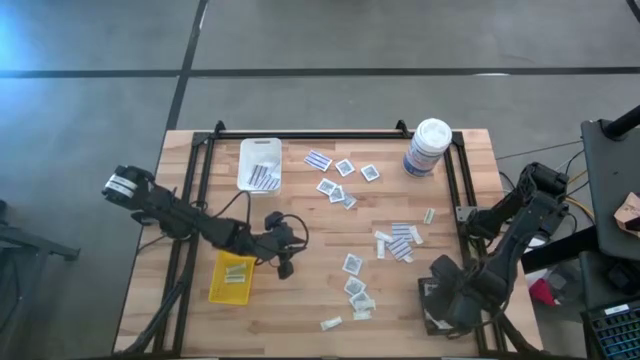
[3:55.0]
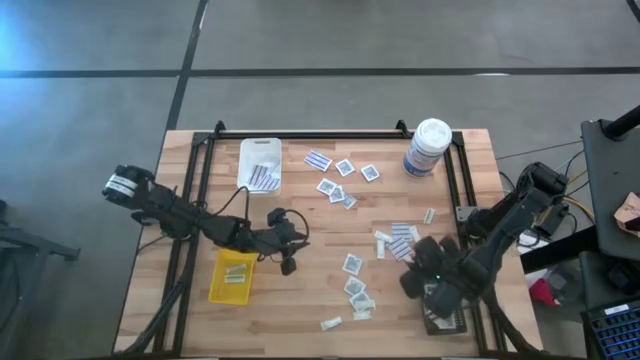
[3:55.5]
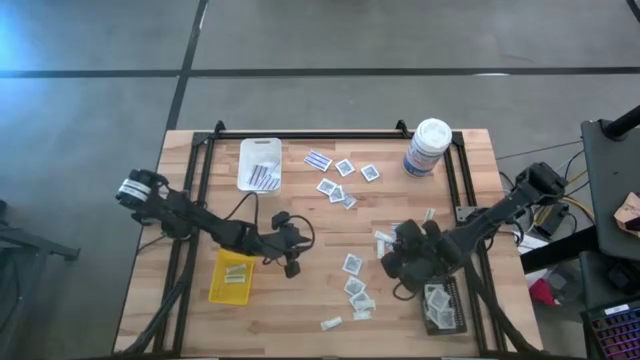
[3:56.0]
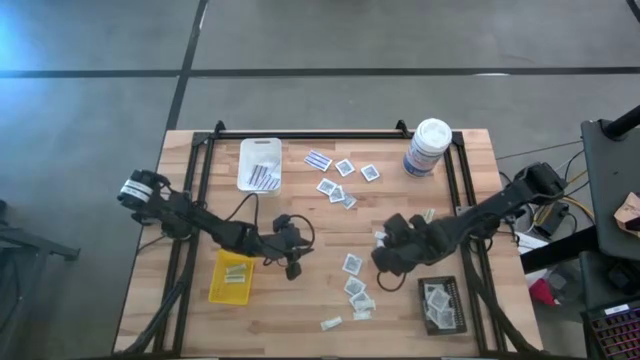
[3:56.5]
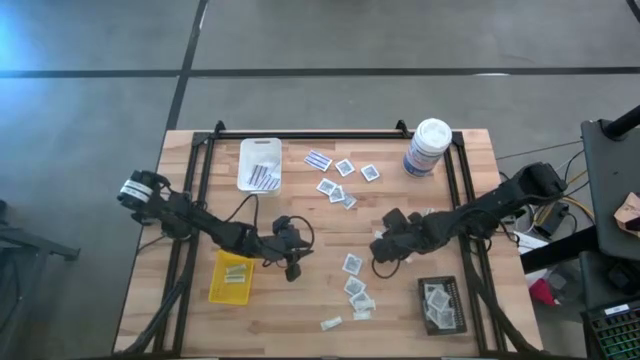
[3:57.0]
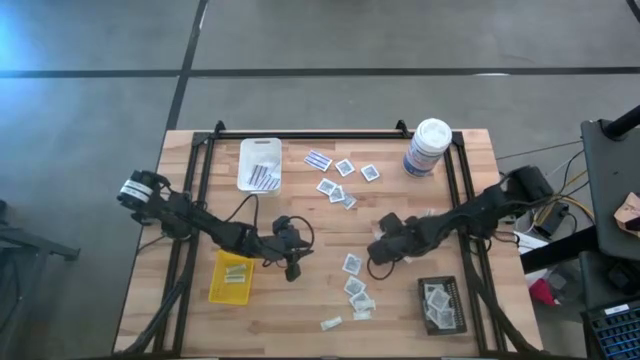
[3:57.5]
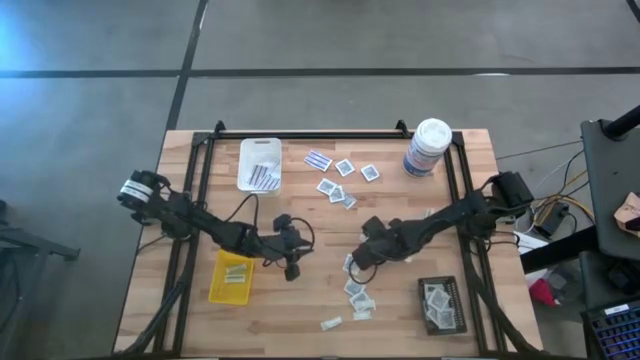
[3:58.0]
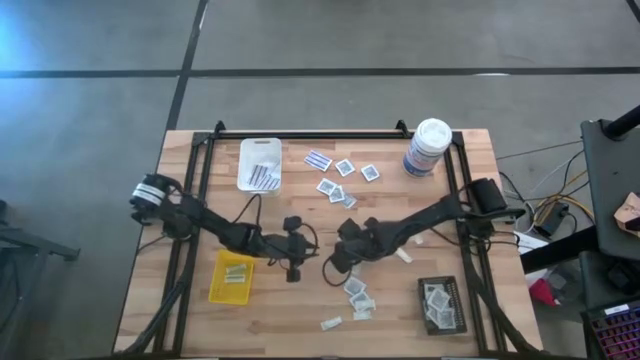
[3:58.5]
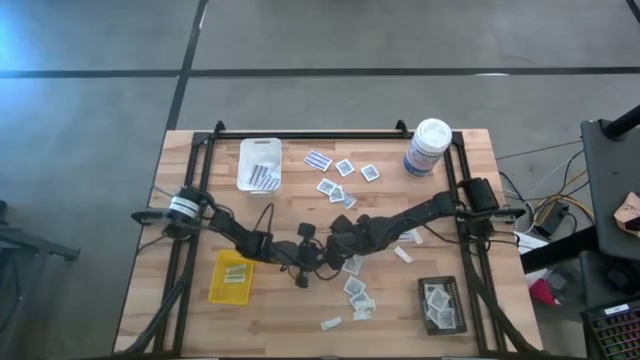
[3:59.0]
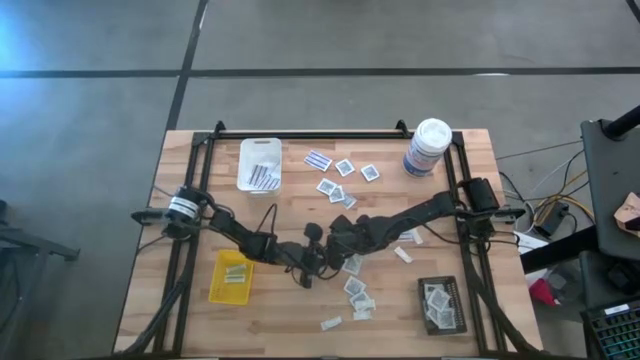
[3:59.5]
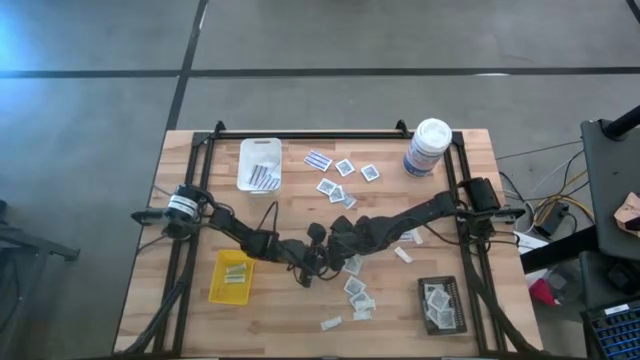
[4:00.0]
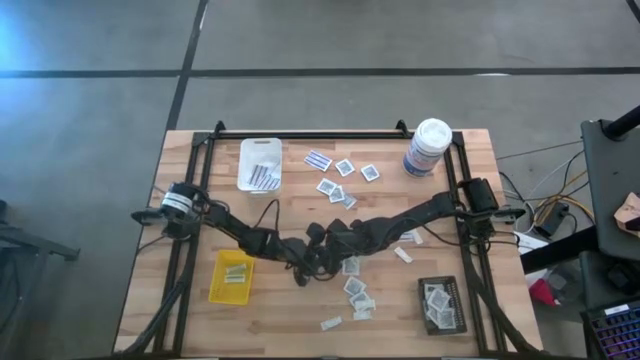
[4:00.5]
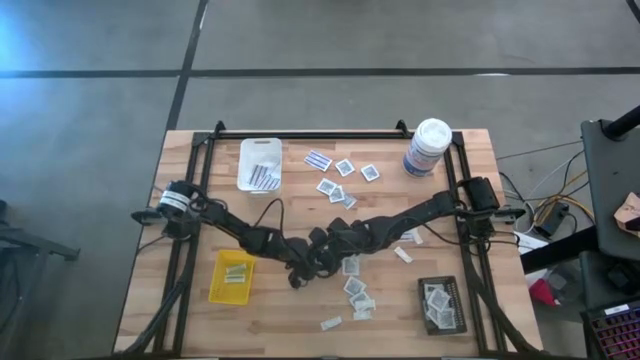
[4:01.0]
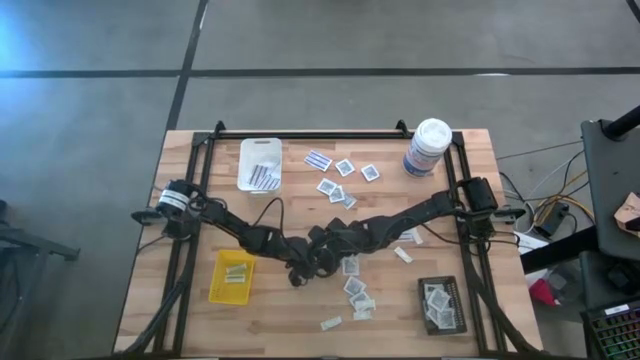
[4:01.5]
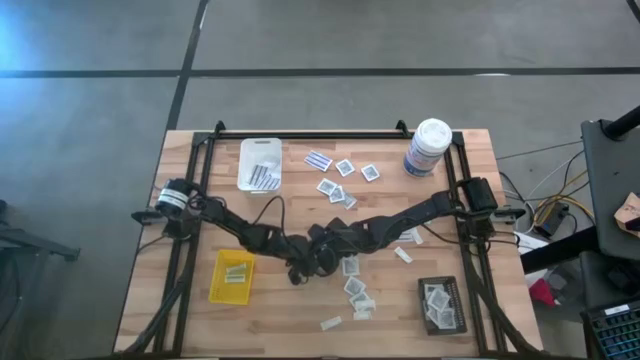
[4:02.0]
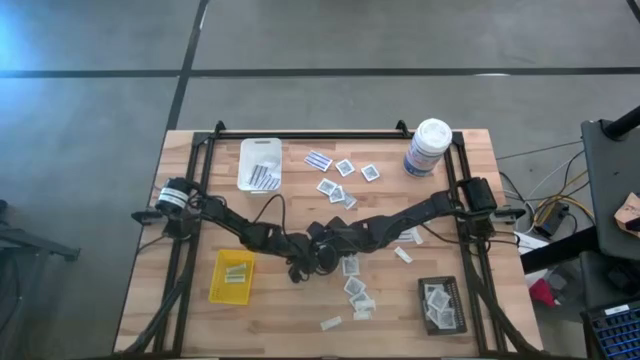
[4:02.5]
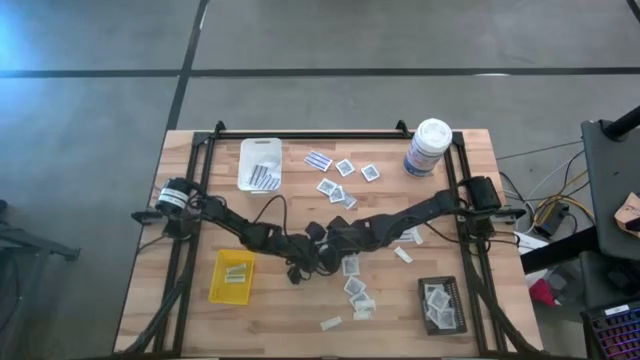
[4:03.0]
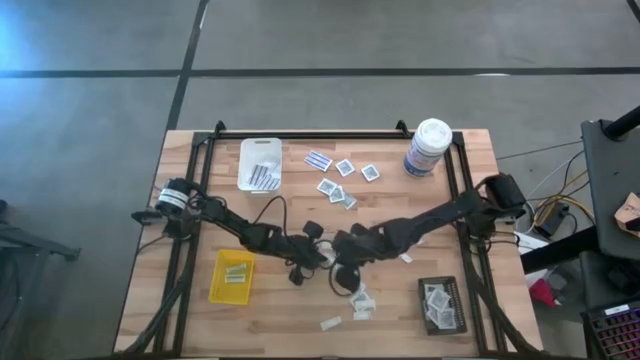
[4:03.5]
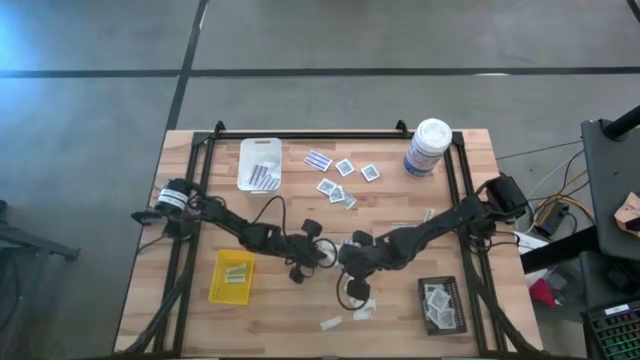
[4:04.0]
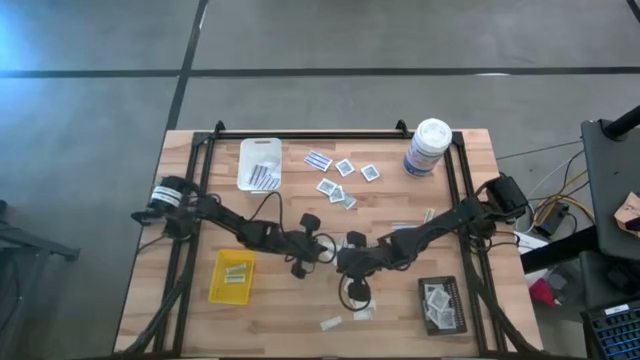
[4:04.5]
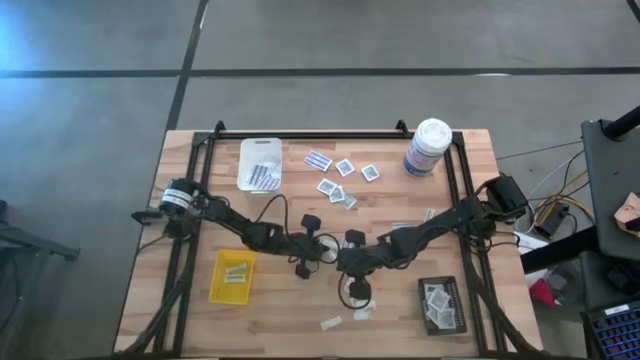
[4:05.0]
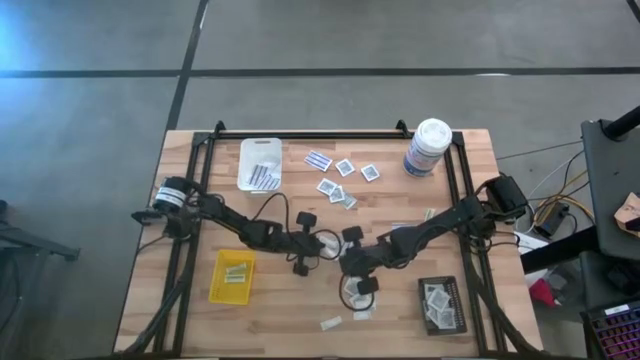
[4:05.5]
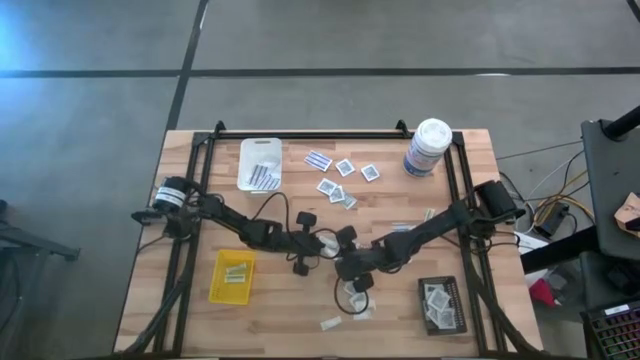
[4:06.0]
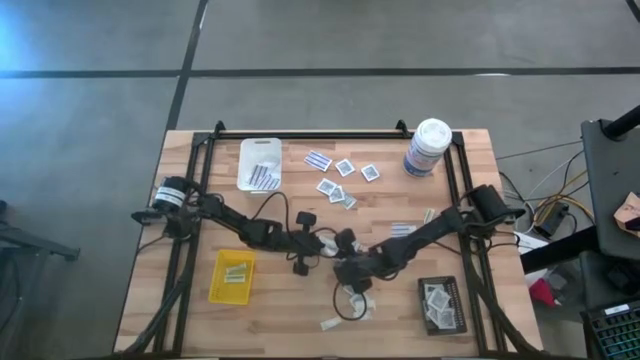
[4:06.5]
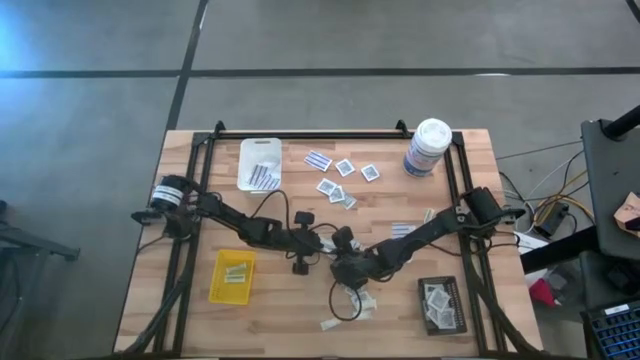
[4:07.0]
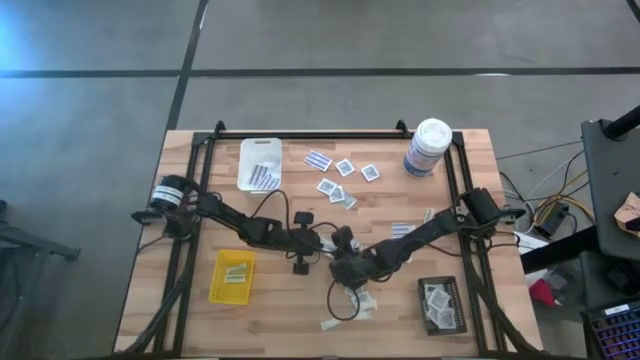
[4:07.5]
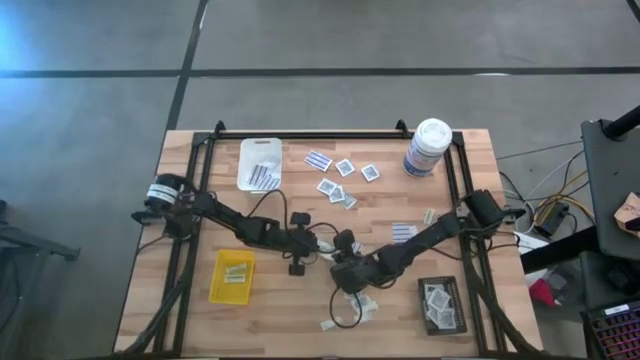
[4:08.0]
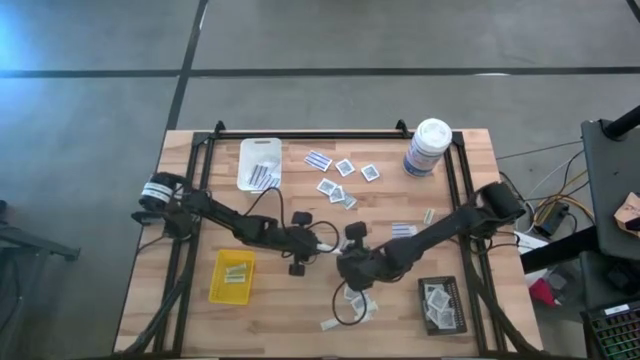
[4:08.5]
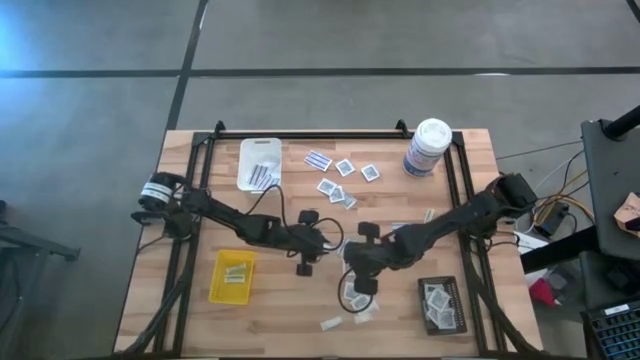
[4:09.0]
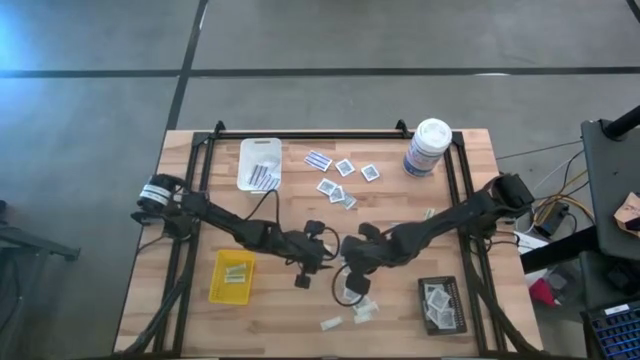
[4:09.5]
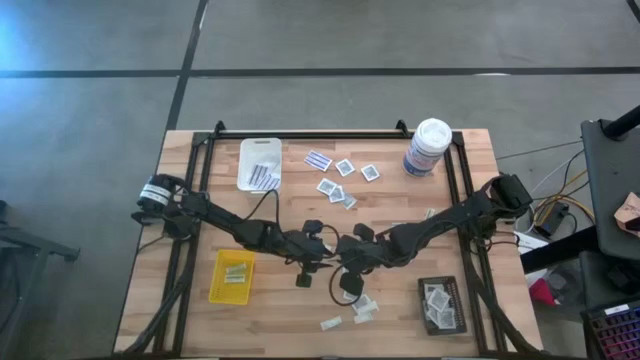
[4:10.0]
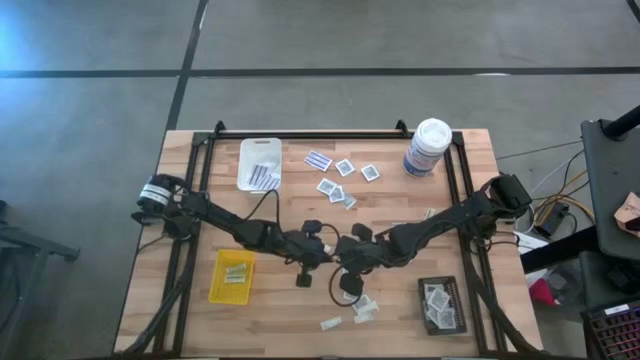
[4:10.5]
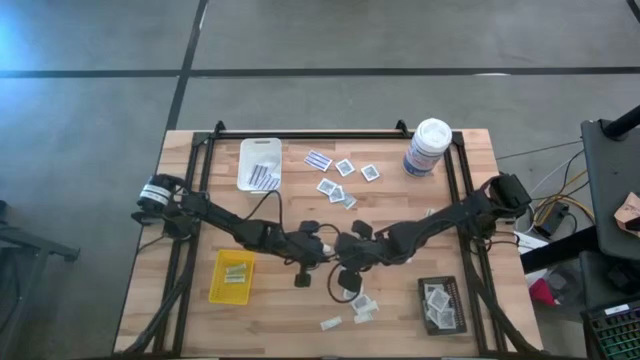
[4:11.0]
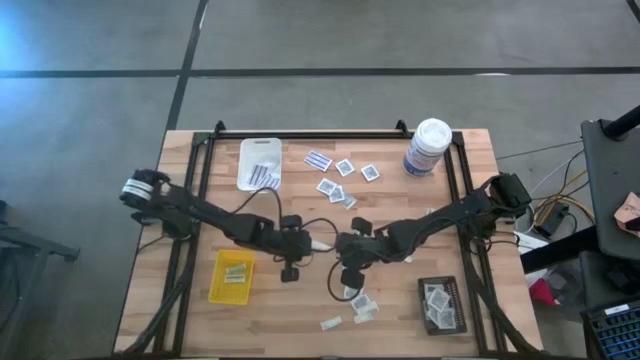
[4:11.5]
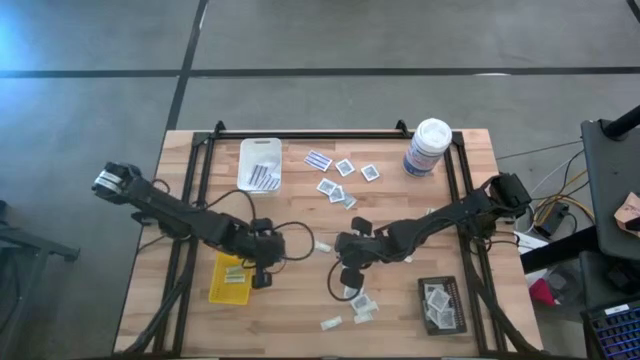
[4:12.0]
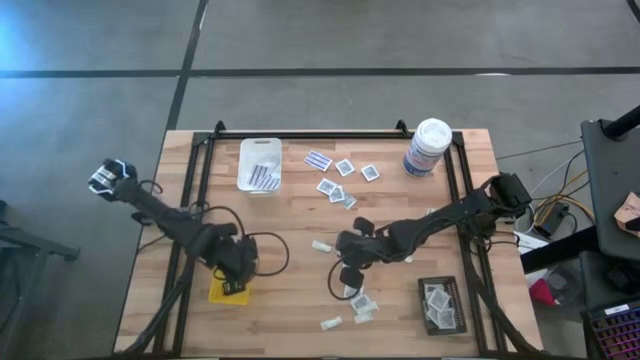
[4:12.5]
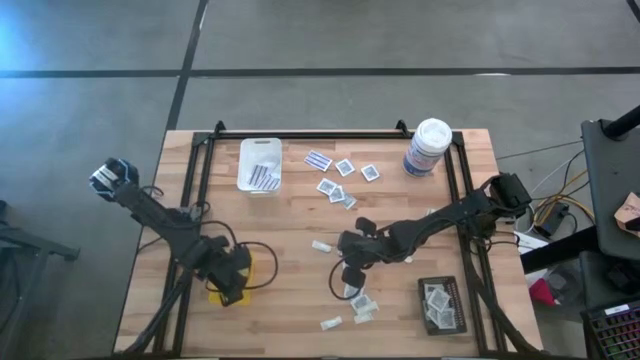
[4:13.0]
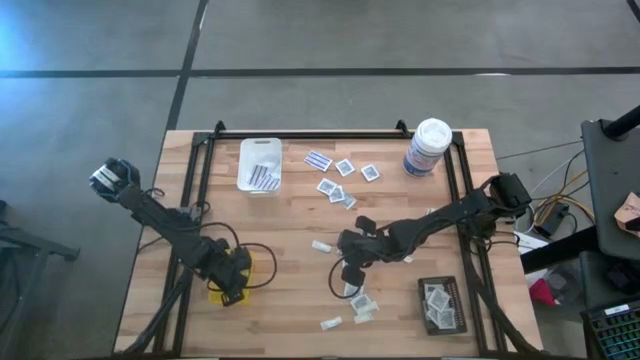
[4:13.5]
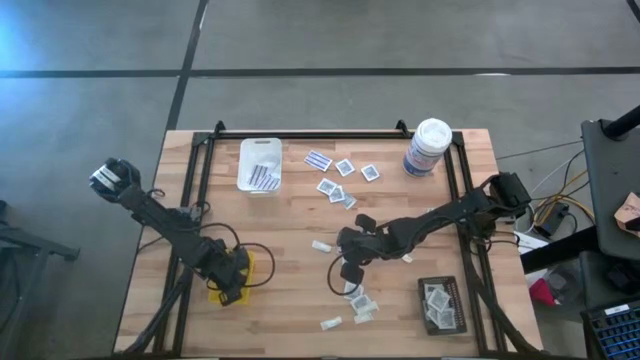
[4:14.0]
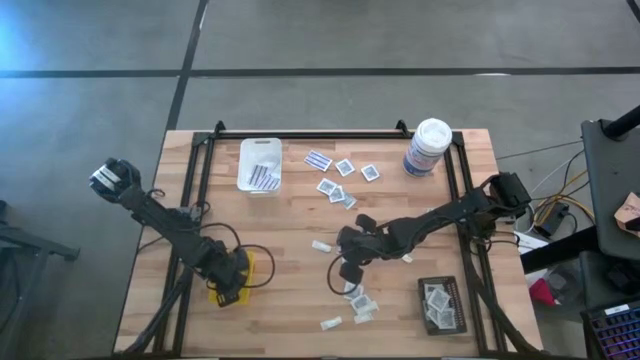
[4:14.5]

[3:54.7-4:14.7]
Task: Pick & Place First Aid Supplies
Put the green bandage into the yellow bin
